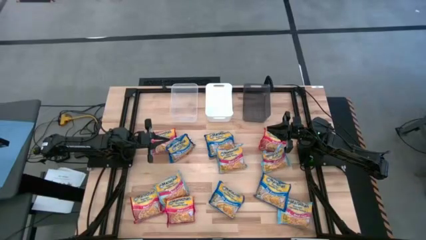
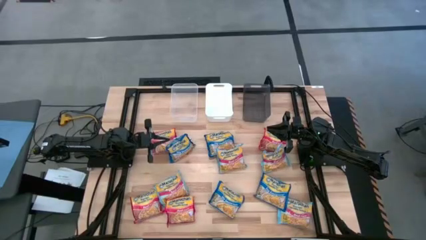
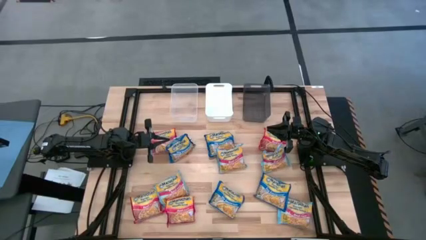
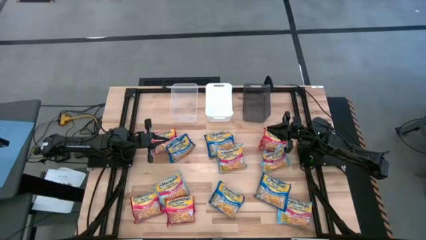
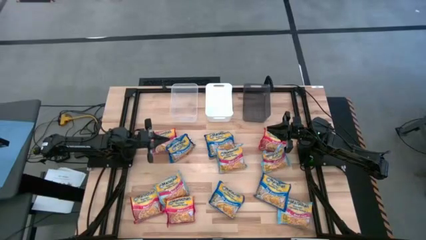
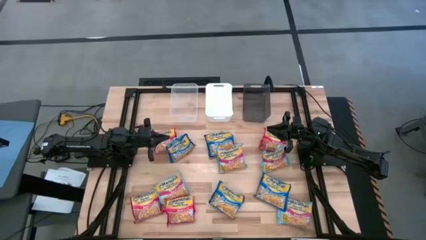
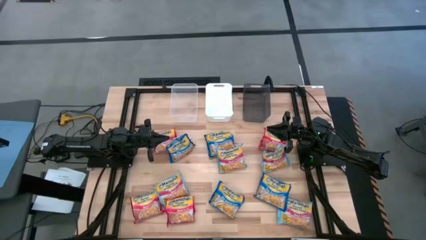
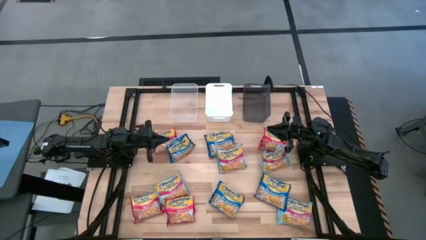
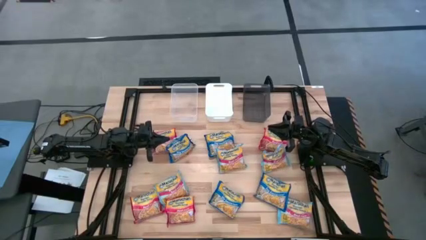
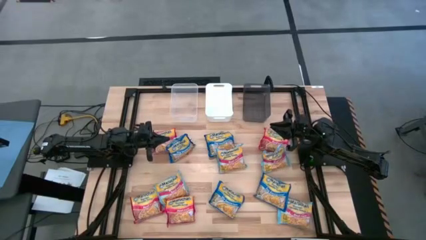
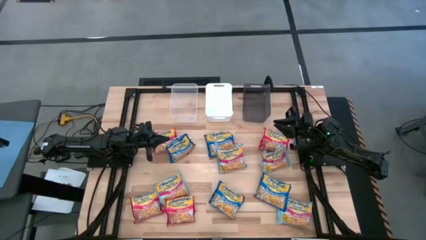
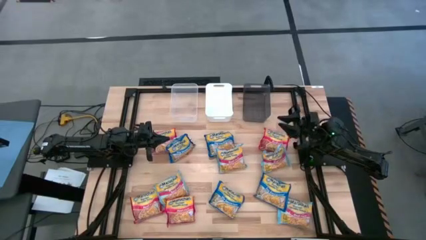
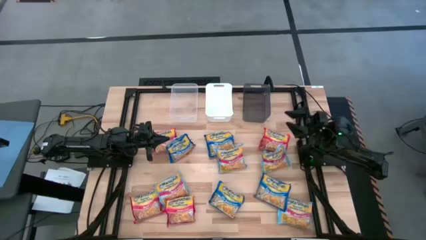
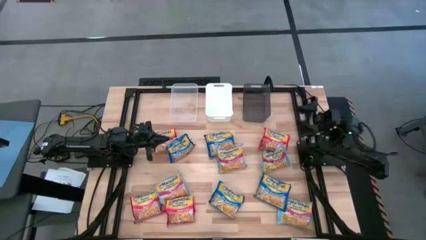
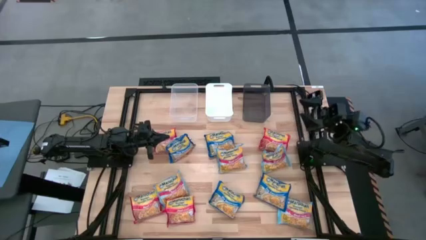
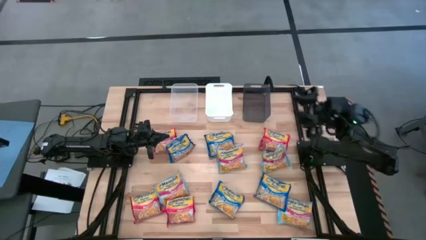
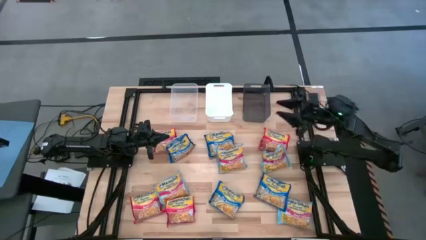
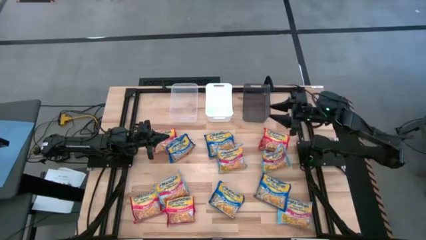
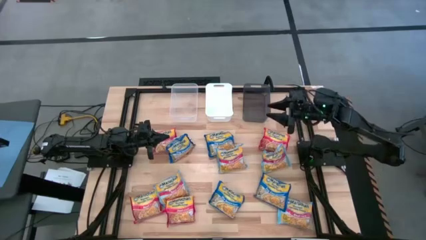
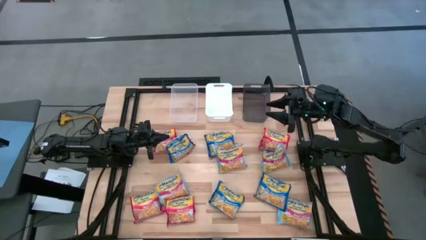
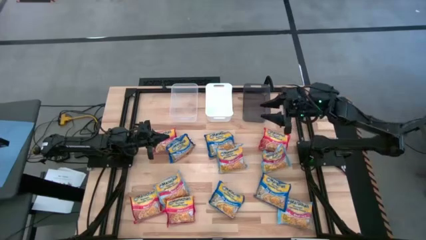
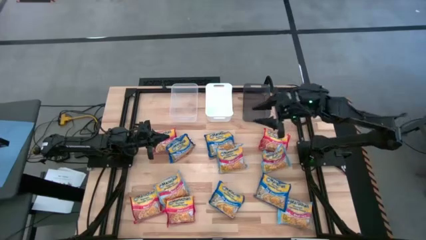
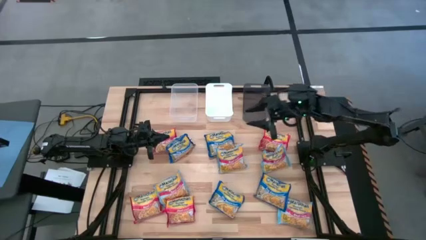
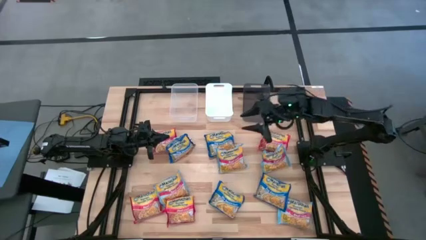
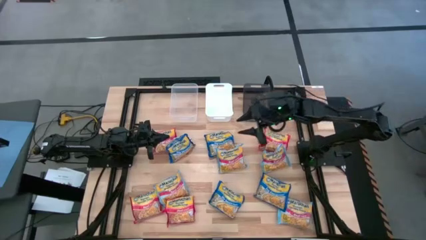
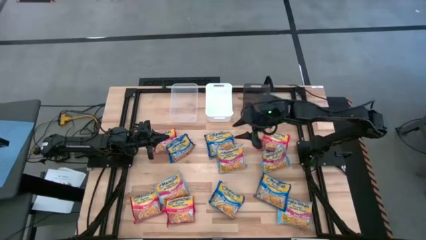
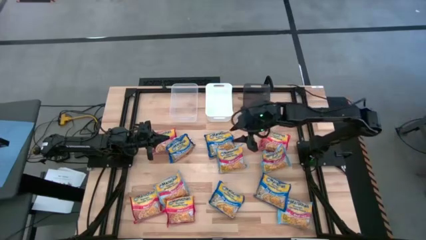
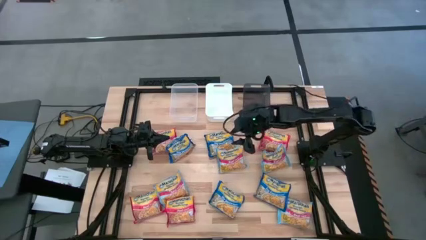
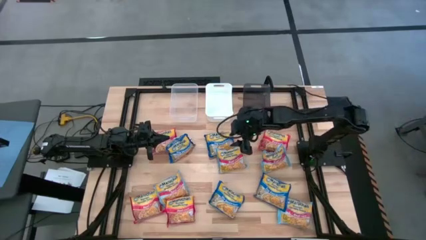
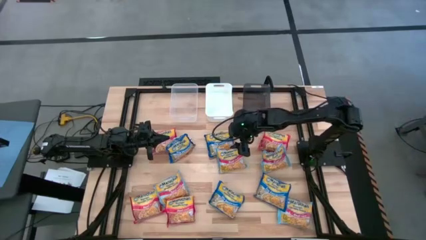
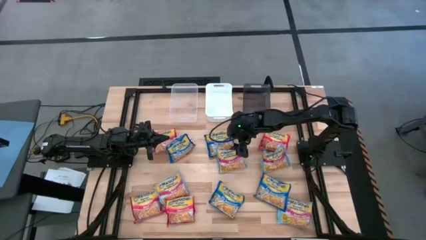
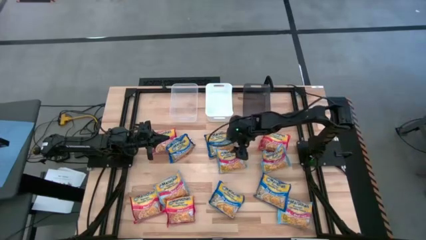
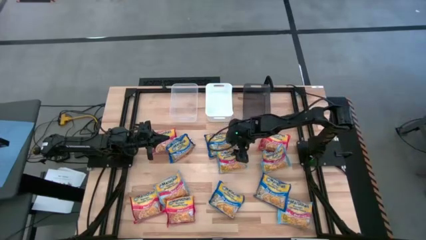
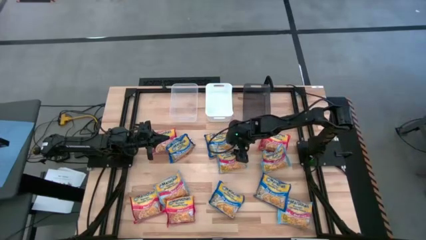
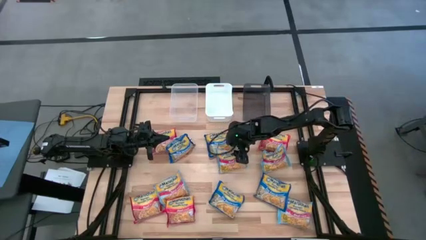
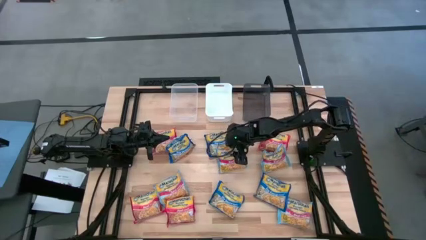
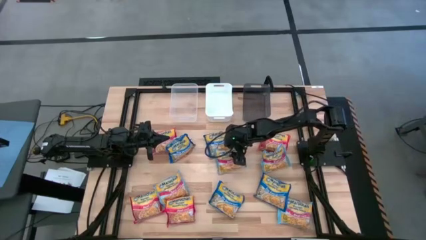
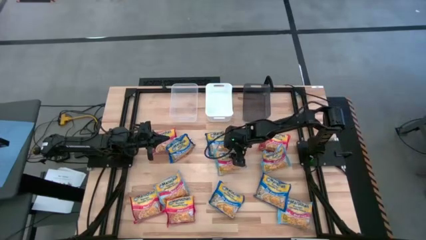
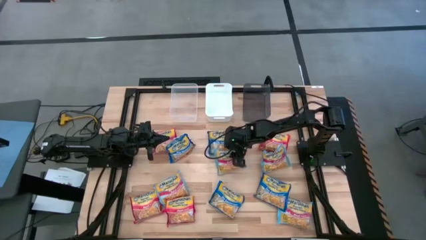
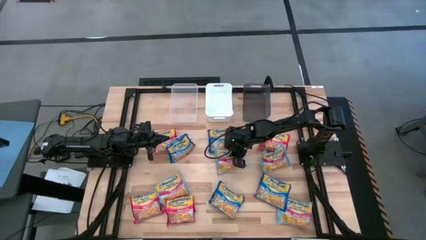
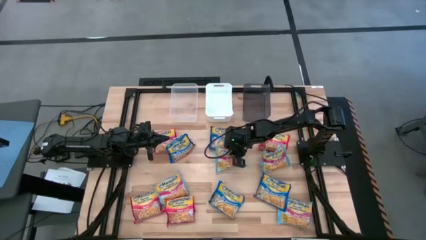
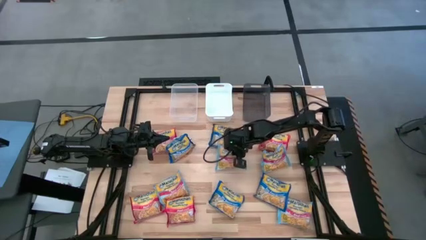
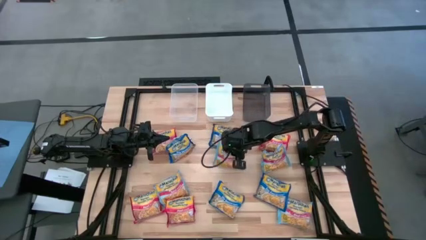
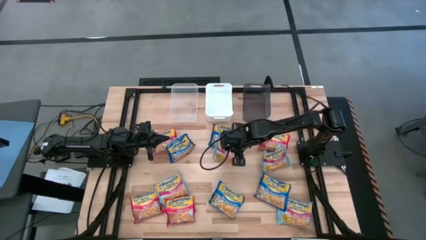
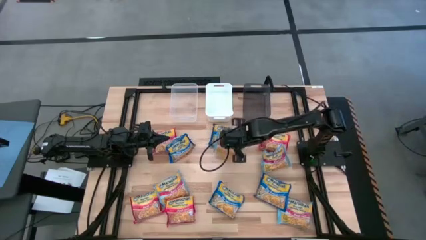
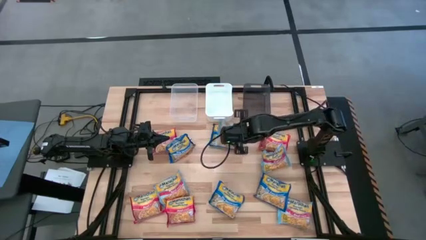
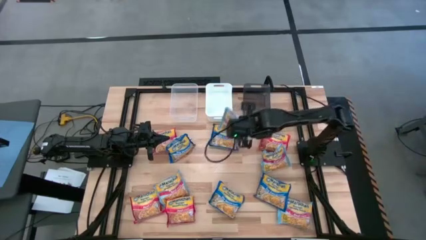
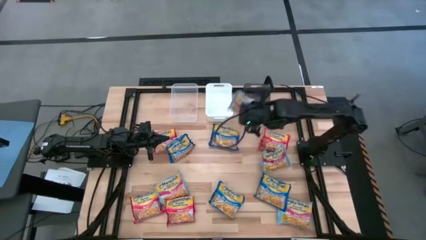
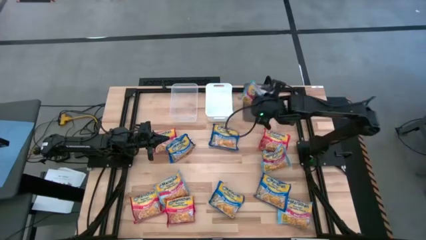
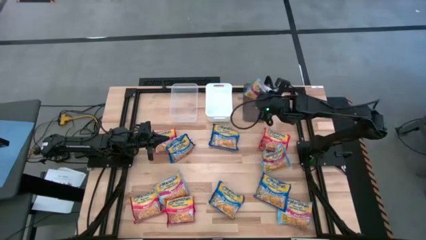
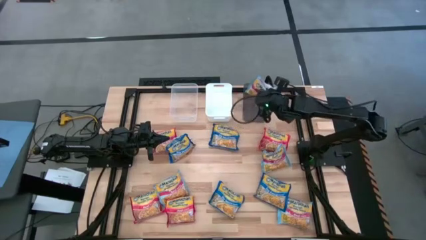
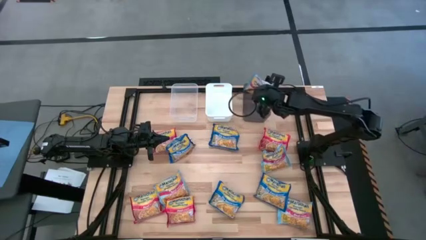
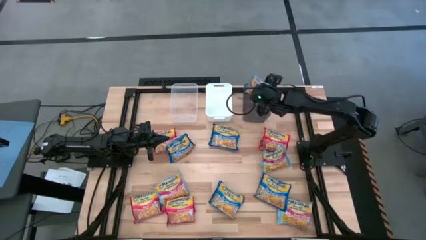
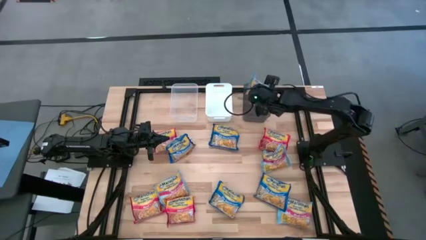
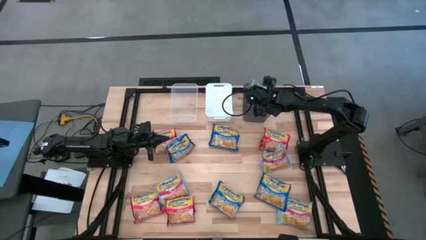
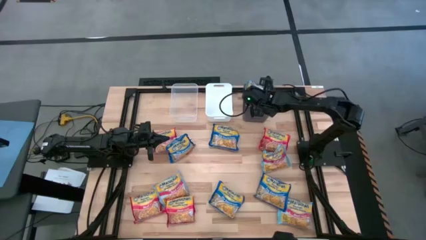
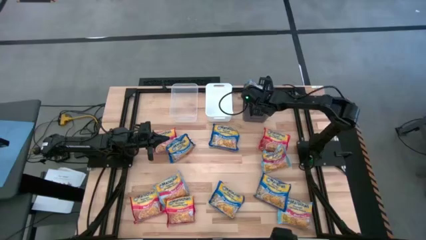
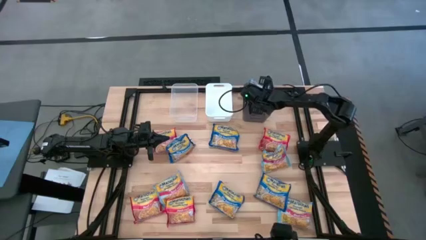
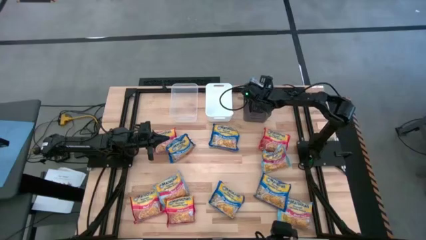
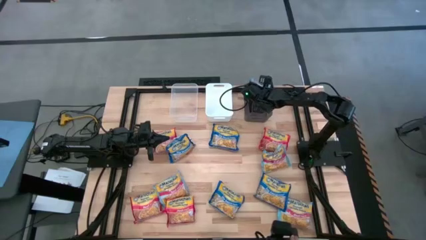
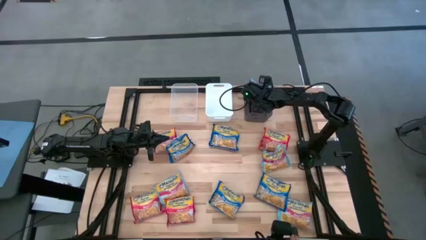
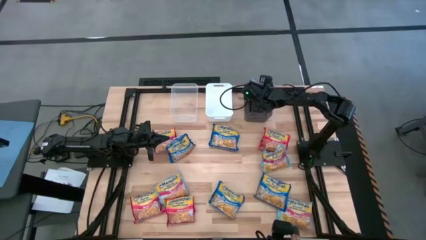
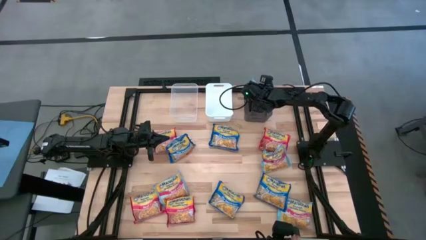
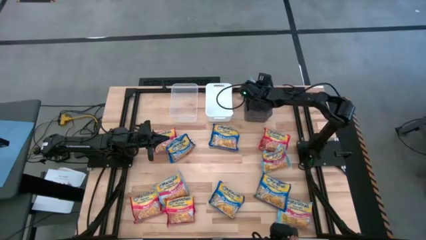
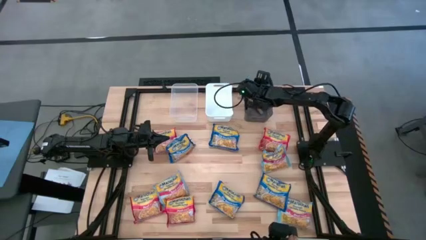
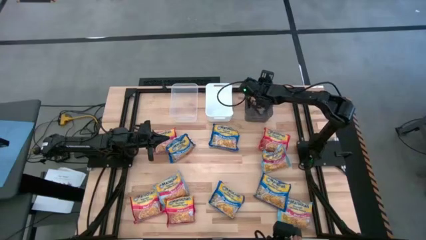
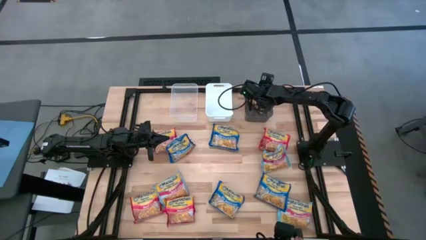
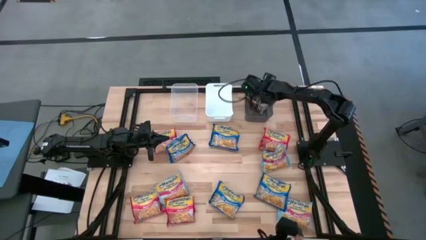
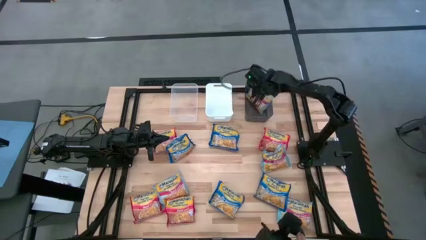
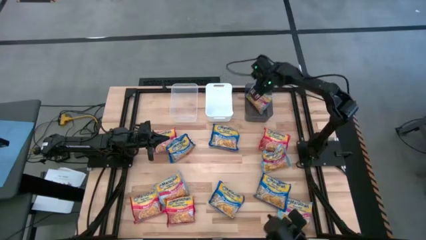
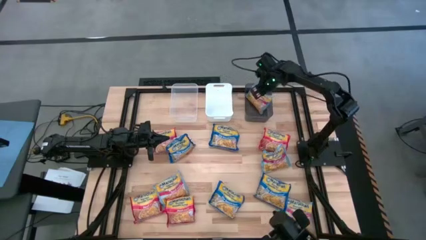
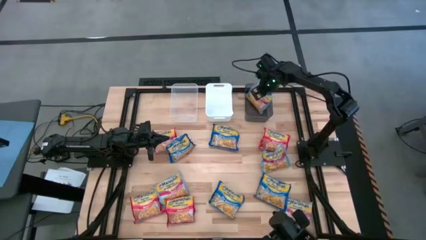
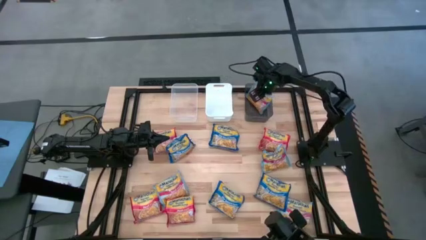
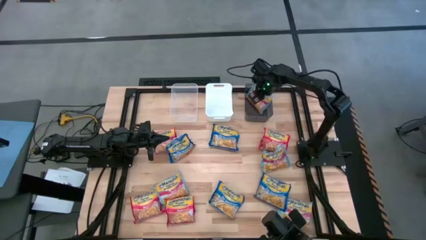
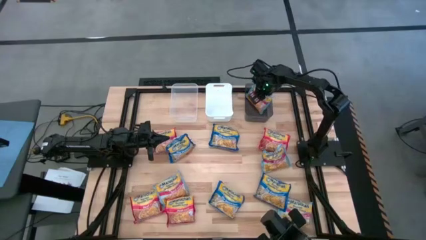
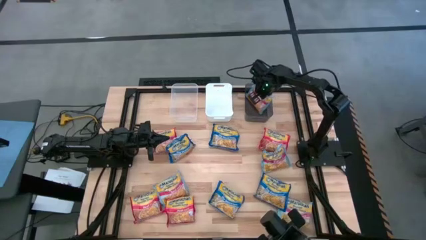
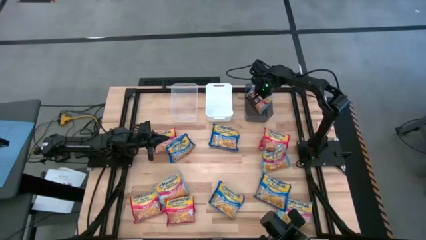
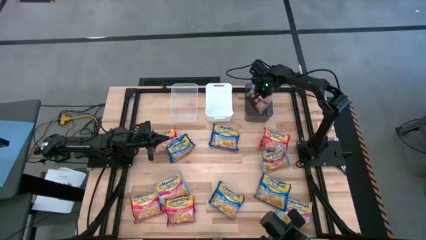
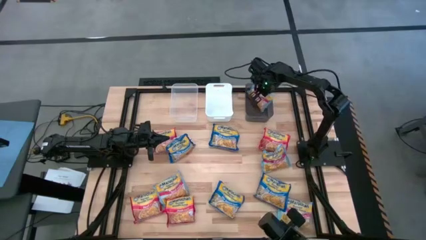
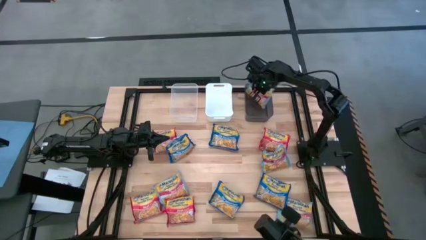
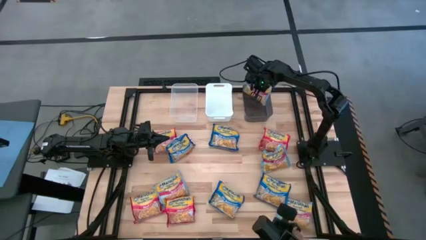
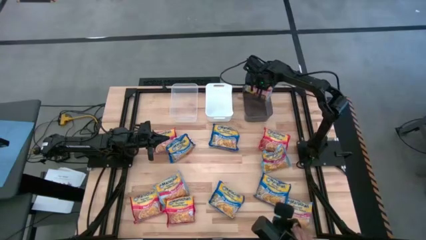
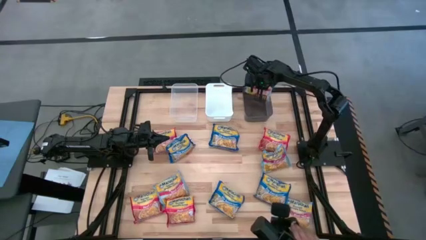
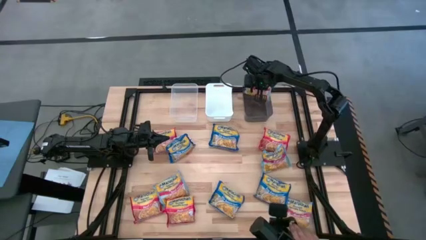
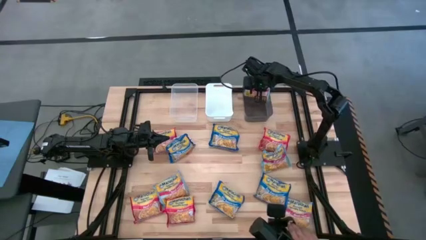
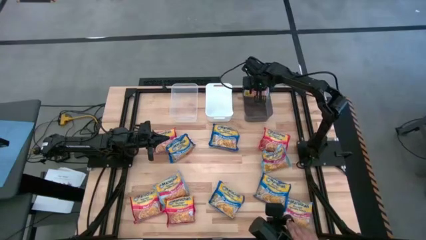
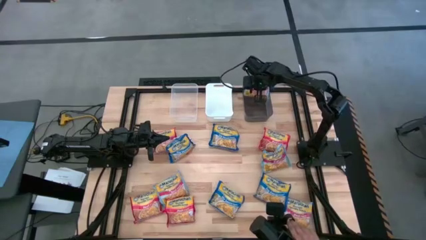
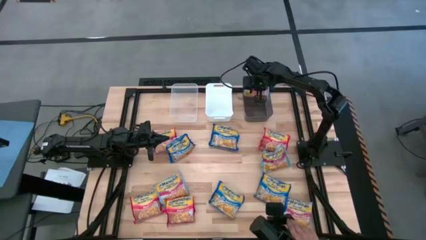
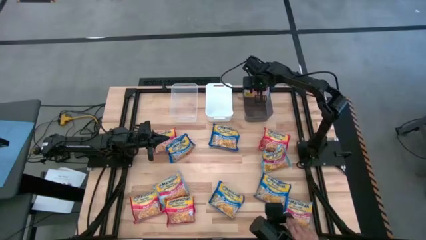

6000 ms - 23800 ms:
Task: Sort Maruchan noodles
Put the light blue noodle pack into the black bin
